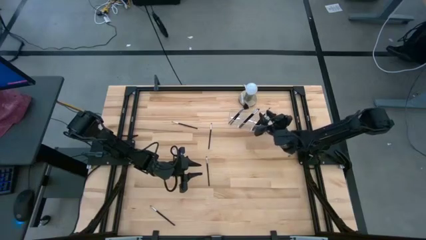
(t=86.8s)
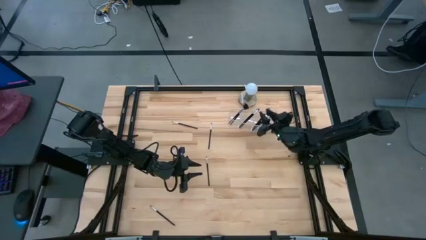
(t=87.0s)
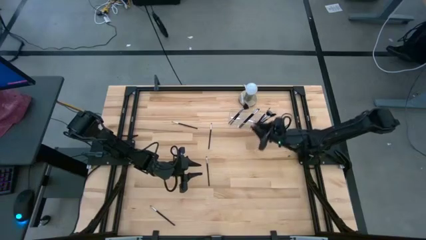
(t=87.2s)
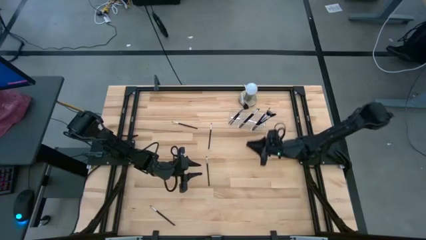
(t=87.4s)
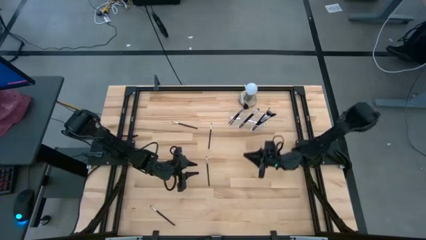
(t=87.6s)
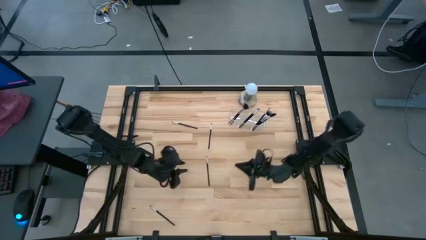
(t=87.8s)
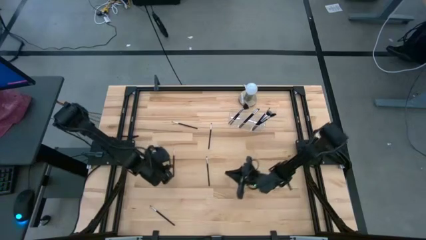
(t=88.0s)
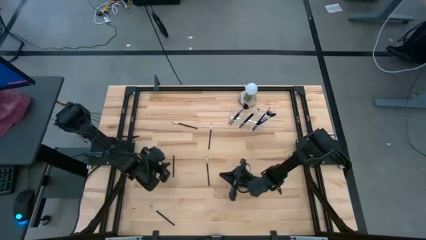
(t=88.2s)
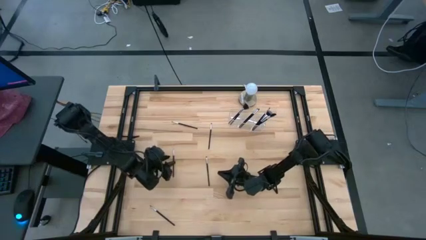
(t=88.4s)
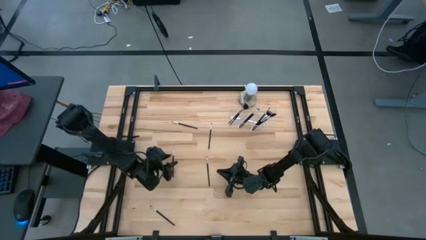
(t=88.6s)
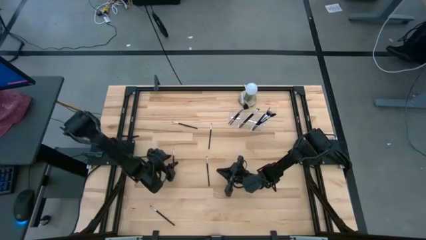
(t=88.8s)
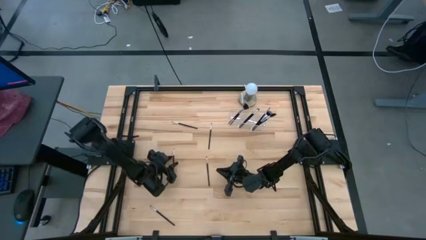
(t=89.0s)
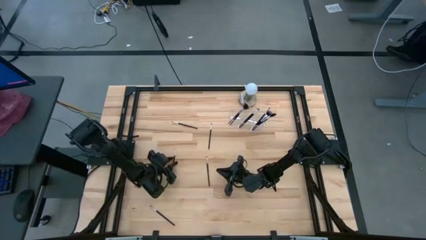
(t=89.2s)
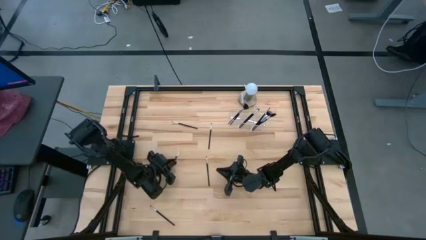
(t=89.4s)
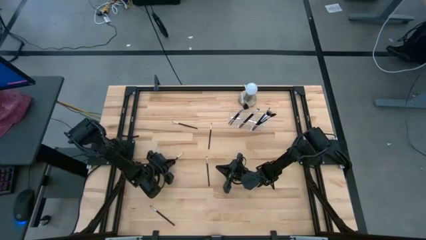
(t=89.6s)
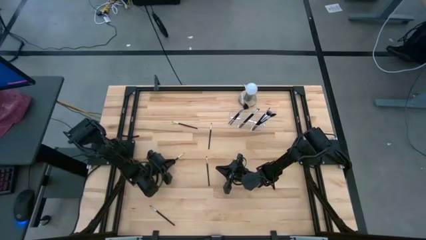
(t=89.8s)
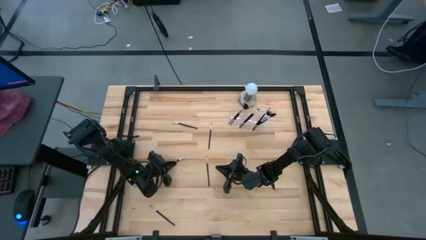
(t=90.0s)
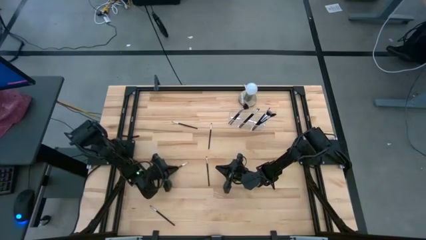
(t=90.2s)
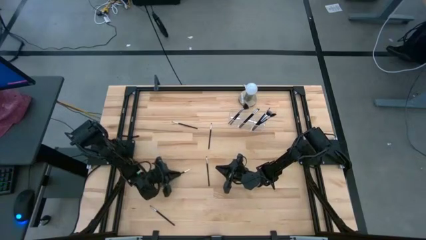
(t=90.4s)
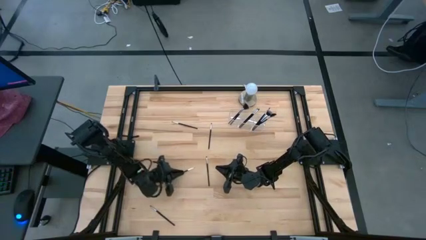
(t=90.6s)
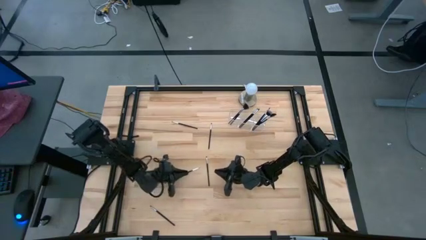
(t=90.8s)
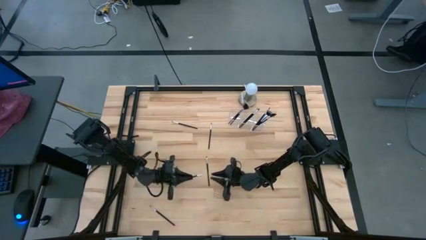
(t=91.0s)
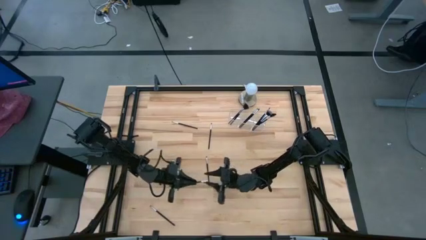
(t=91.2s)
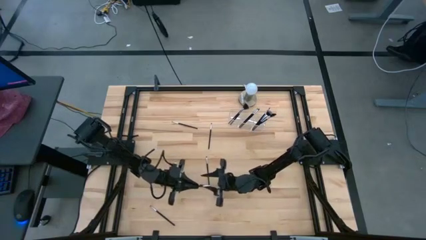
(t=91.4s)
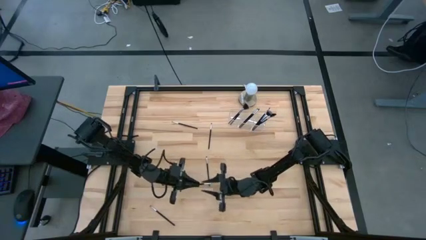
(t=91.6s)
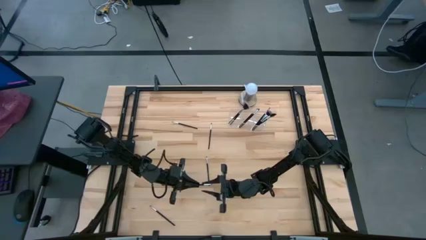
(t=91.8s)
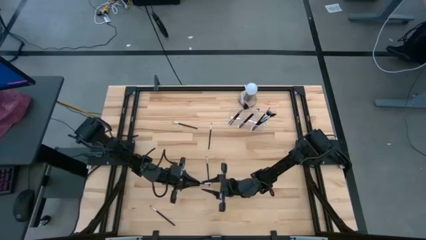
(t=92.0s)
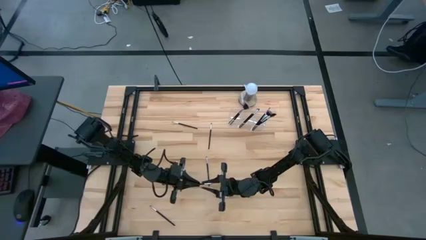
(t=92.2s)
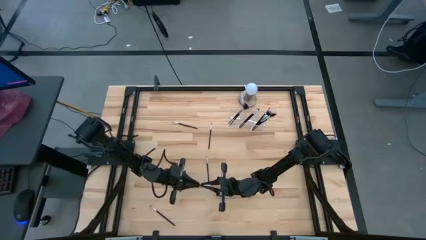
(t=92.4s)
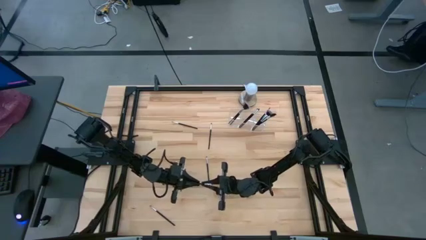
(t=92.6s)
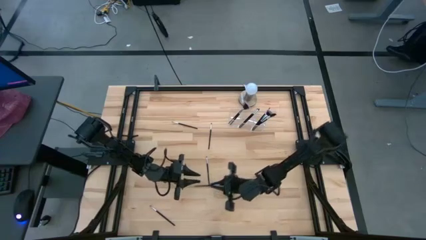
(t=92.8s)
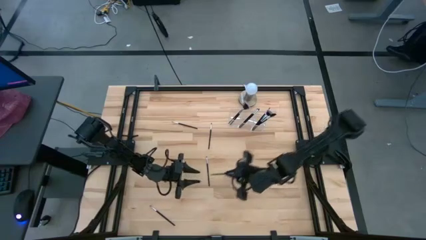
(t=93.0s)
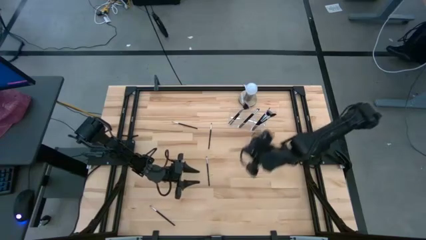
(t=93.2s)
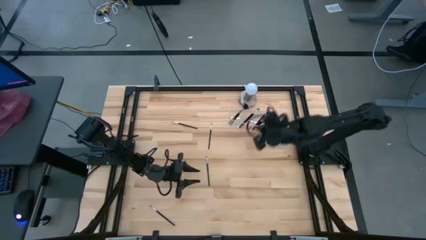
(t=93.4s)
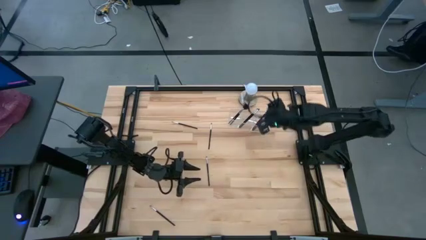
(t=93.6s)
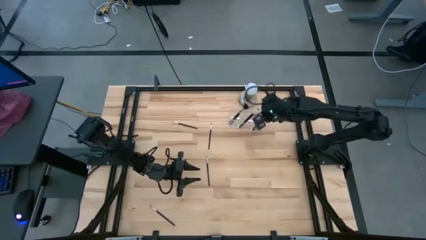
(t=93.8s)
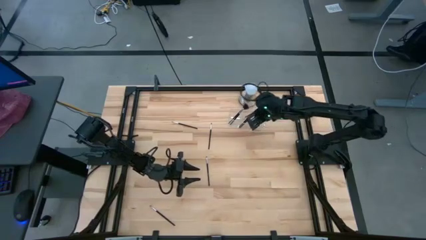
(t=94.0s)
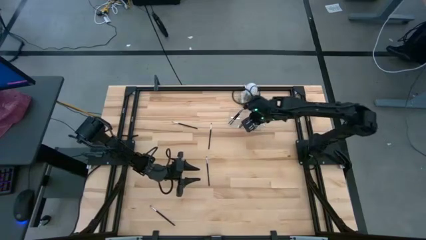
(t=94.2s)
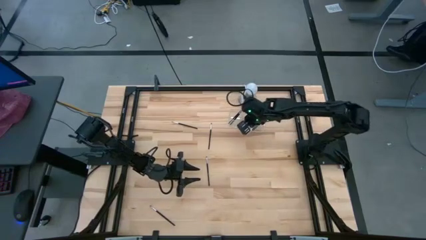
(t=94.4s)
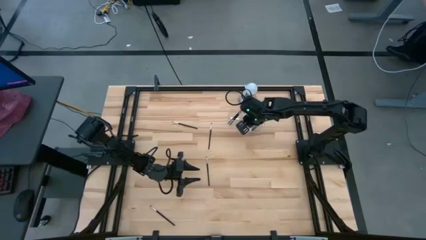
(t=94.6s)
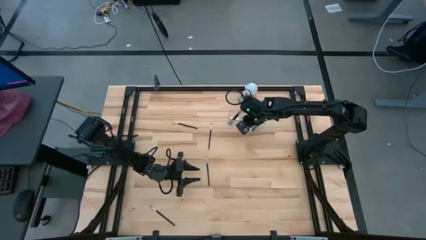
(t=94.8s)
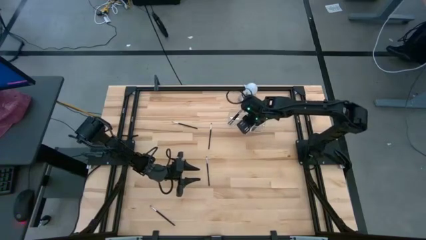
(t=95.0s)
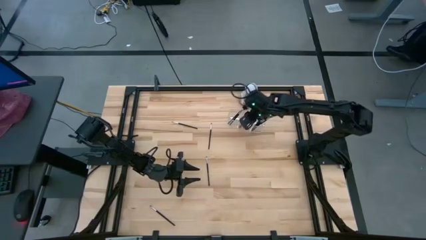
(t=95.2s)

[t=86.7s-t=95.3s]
Task: Put items in baskets/containers
Put the liner brush into the transparent organizer

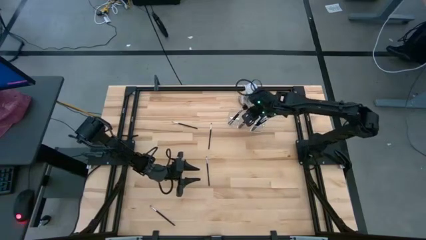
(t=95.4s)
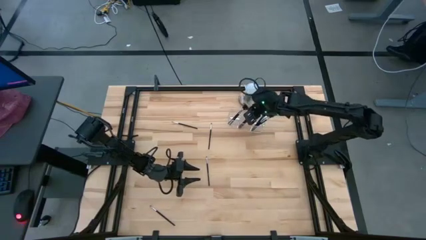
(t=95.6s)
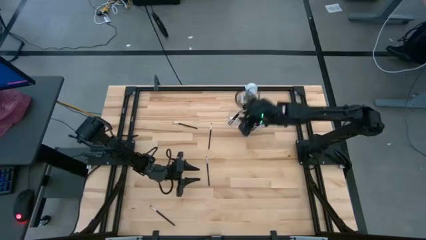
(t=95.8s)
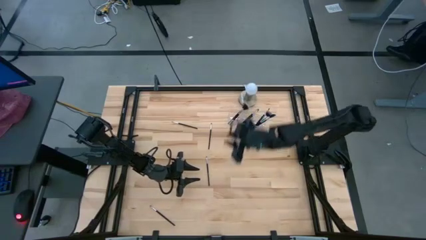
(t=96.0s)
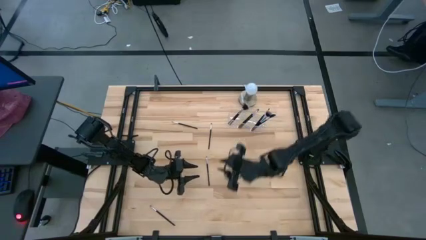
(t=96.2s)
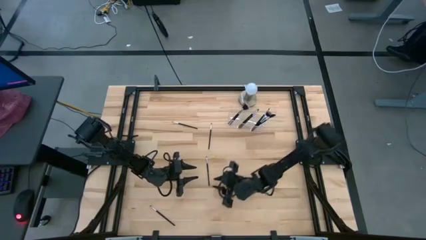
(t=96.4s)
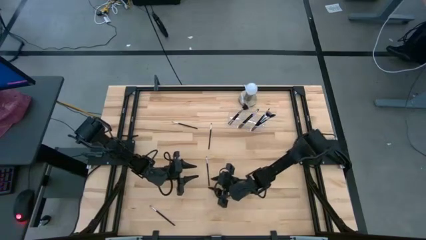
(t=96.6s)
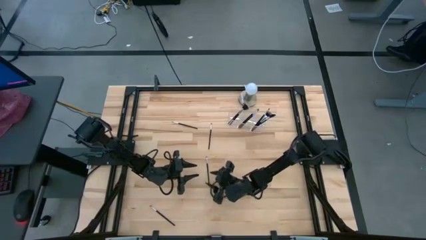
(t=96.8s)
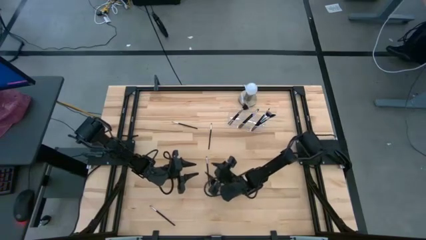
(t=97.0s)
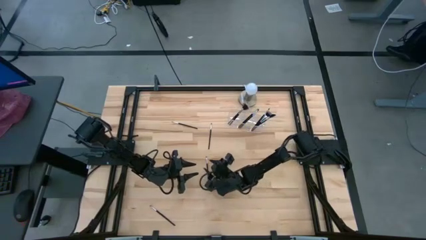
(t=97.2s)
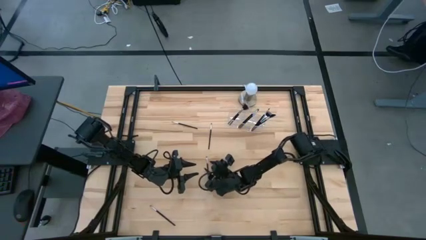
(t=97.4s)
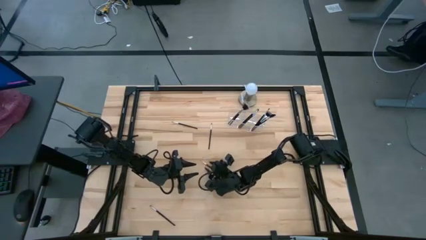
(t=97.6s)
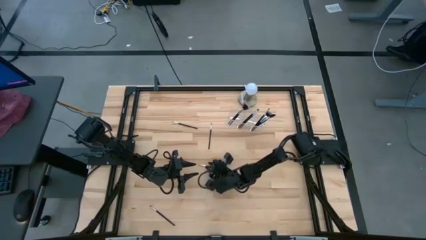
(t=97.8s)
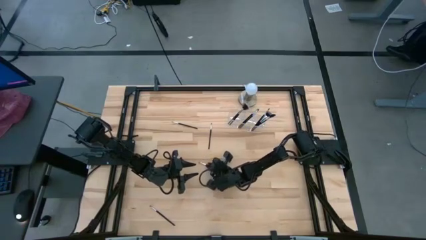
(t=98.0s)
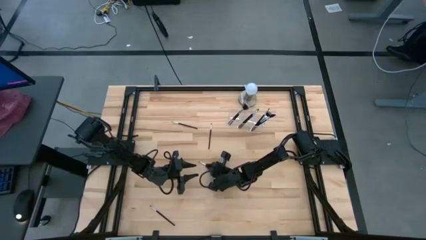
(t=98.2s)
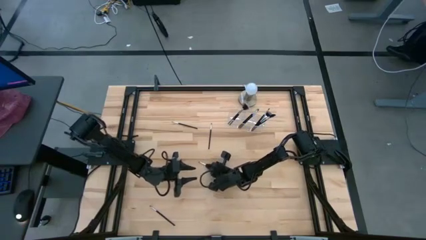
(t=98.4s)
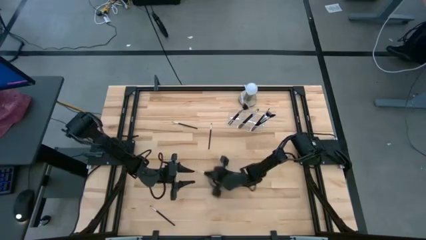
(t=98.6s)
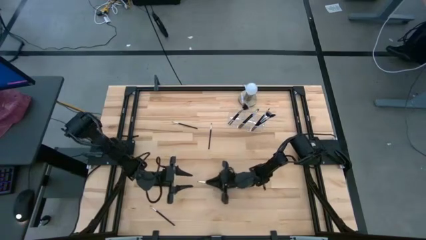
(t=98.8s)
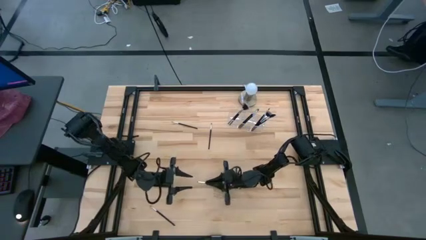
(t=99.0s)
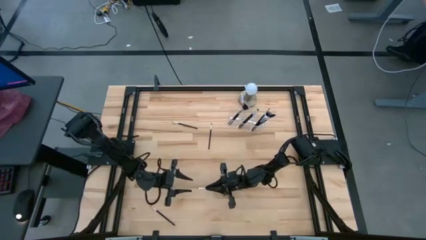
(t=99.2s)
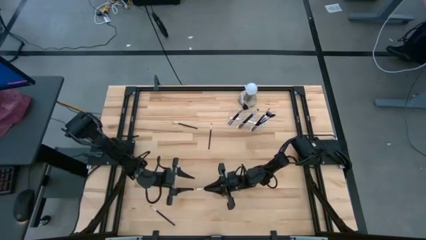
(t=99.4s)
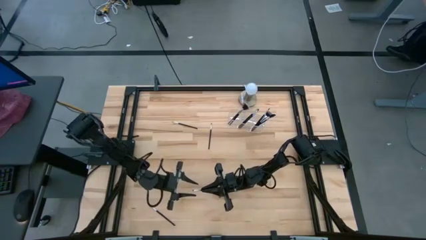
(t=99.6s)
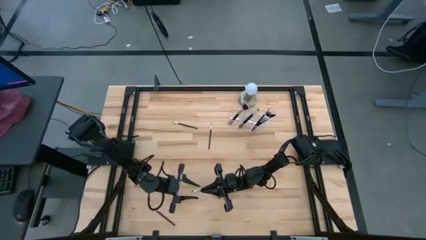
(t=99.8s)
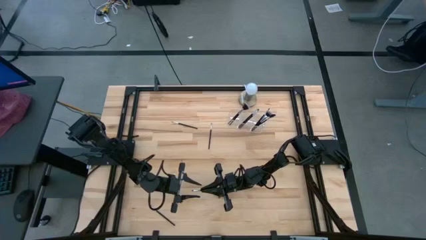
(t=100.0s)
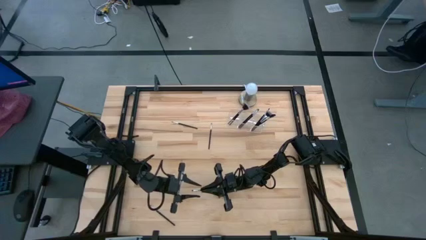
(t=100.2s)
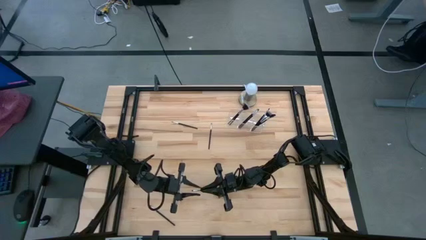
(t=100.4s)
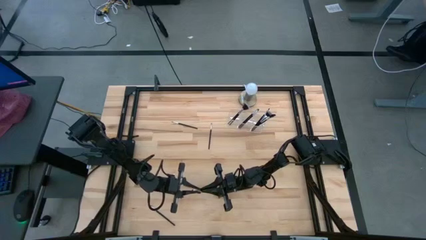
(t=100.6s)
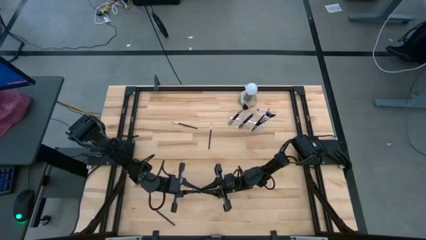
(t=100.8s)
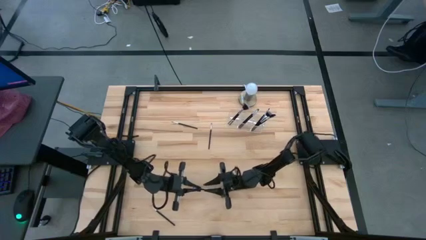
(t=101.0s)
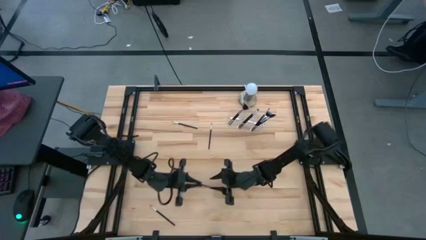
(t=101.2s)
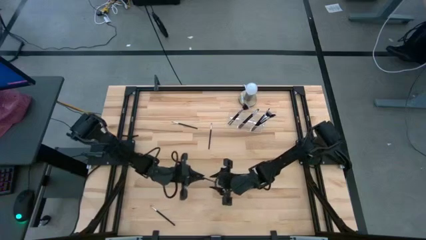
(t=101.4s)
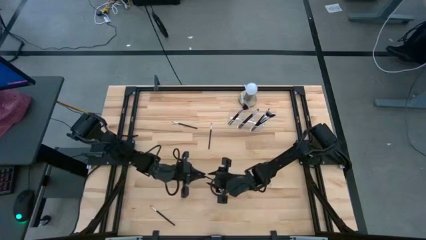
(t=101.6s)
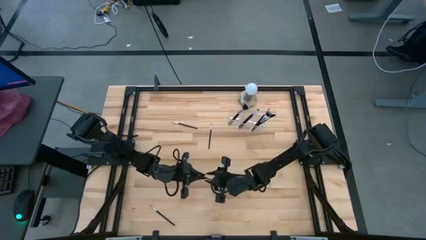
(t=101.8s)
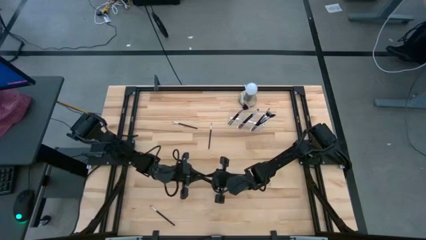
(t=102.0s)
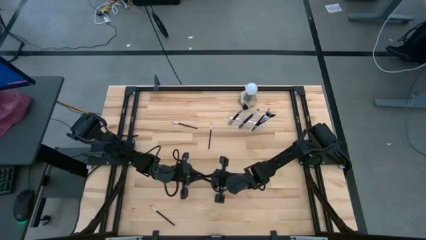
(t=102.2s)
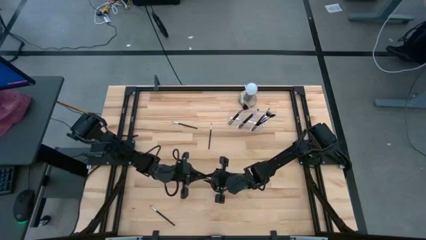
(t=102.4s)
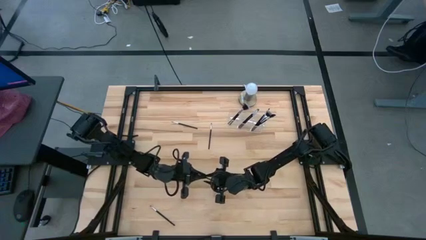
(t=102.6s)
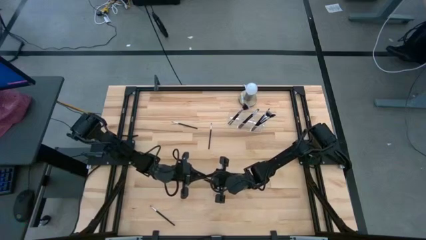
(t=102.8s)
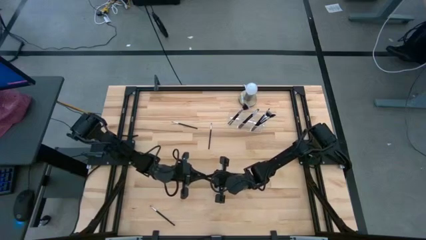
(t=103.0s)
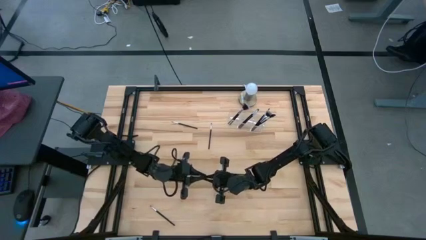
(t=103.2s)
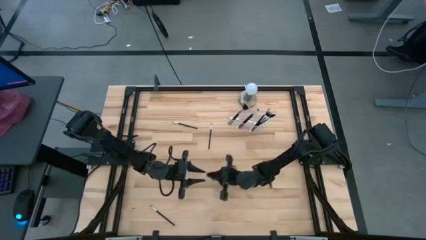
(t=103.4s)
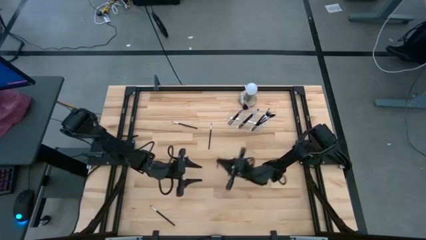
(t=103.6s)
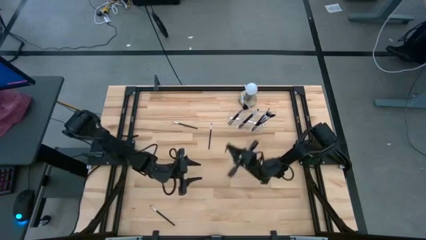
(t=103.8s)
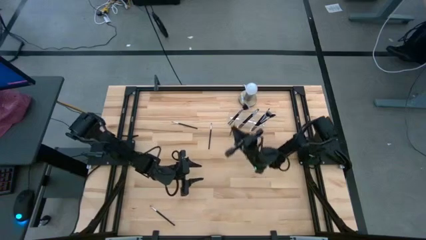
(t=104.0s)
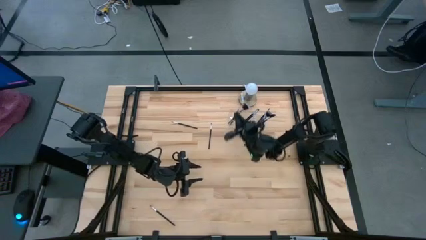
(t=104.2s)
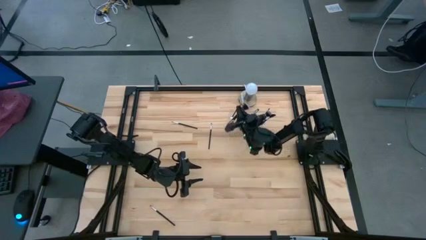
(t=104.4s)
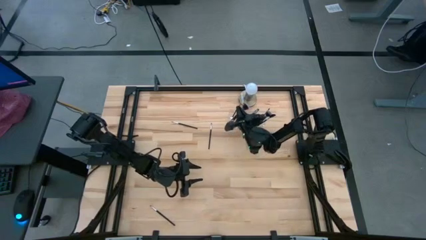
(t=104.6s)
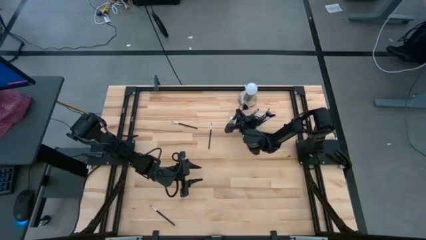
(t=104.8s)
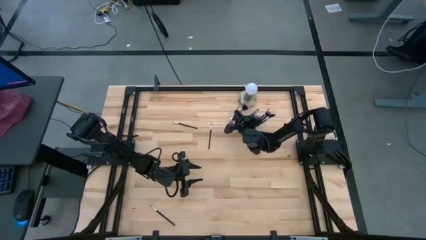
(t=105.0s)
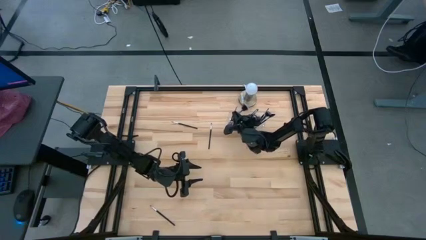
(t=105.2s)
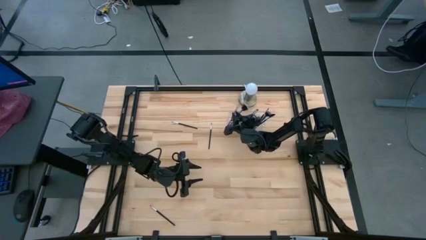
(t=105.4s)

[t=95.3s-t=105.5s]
Put the eyeshadow brush into the transparent organizer
